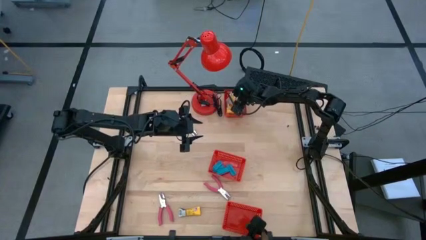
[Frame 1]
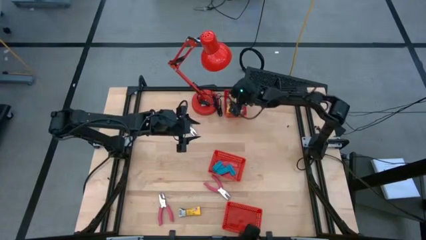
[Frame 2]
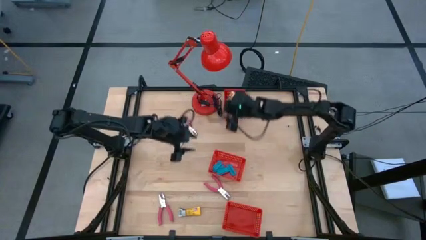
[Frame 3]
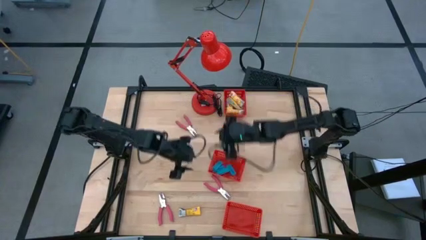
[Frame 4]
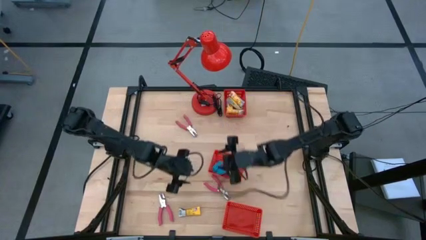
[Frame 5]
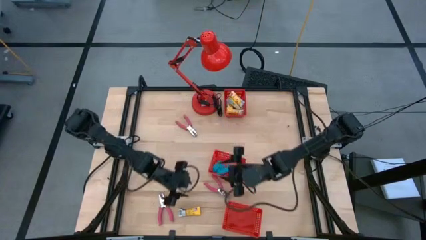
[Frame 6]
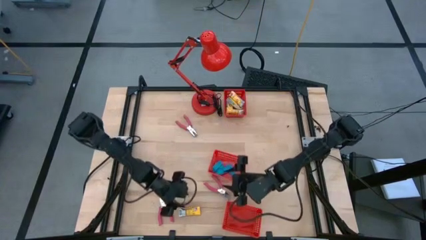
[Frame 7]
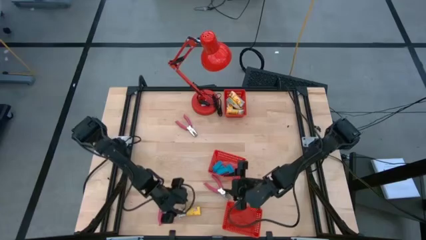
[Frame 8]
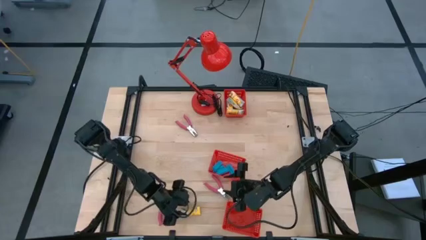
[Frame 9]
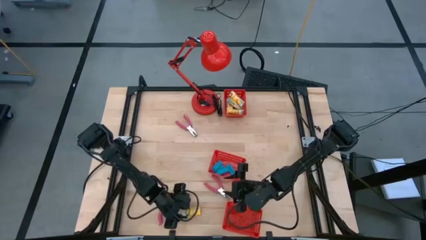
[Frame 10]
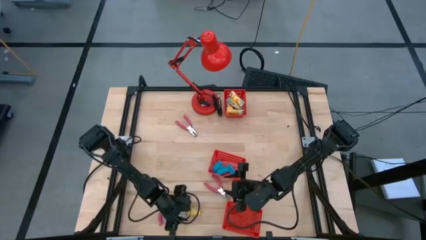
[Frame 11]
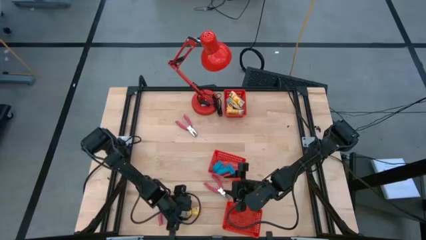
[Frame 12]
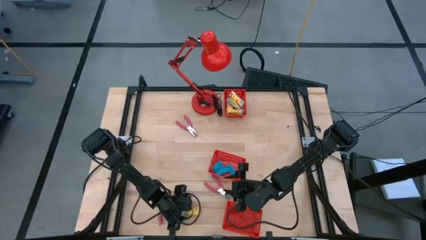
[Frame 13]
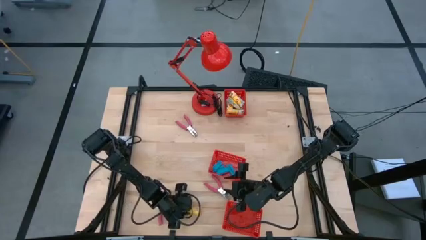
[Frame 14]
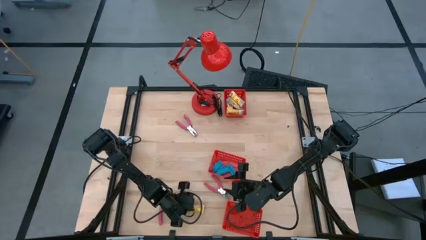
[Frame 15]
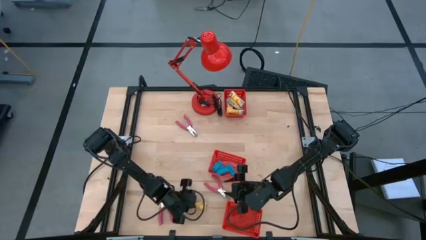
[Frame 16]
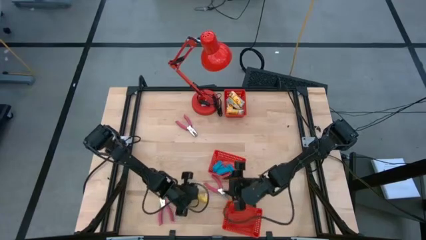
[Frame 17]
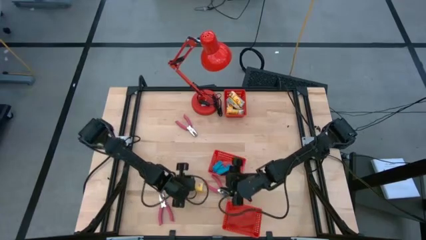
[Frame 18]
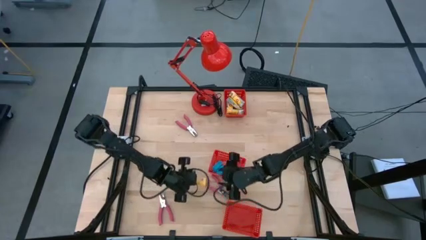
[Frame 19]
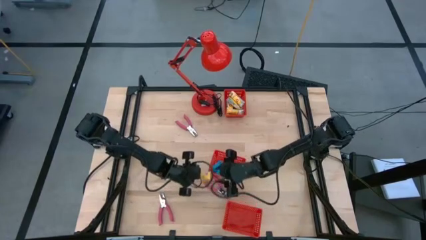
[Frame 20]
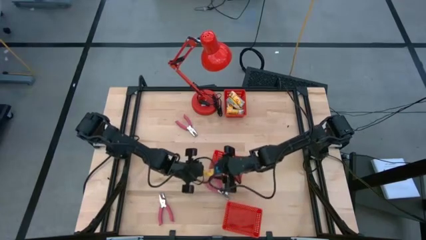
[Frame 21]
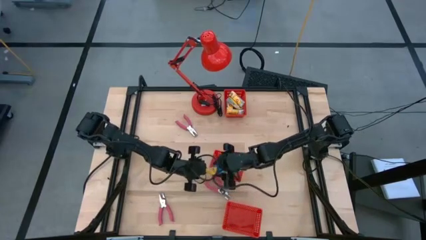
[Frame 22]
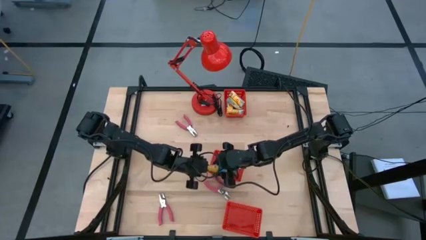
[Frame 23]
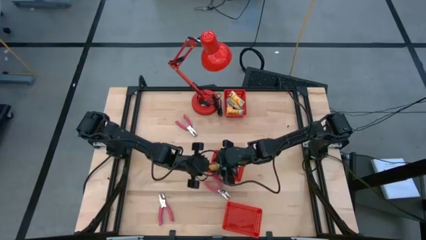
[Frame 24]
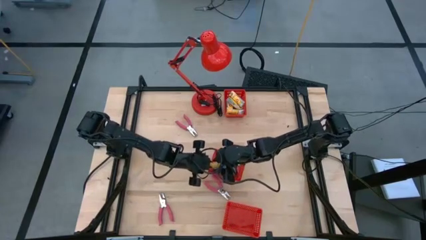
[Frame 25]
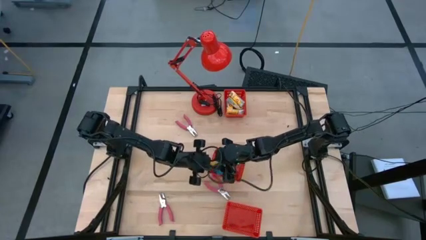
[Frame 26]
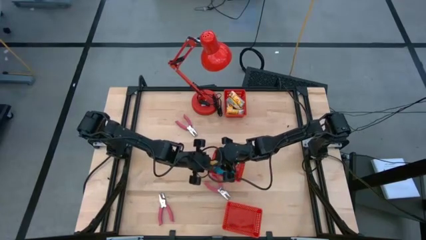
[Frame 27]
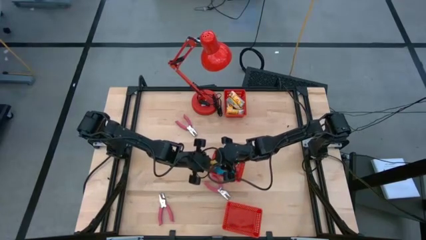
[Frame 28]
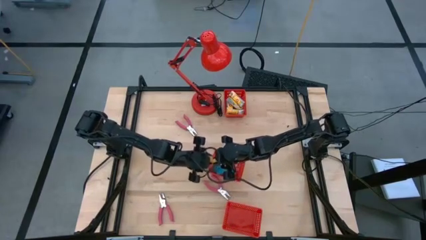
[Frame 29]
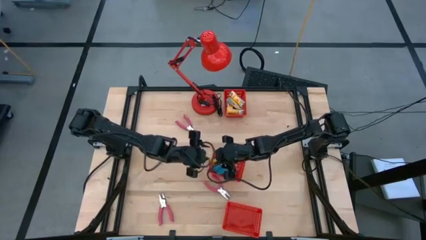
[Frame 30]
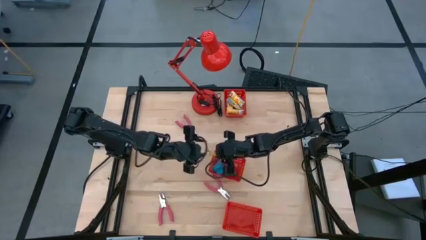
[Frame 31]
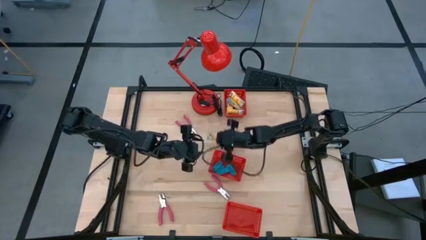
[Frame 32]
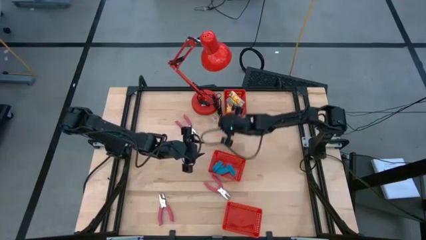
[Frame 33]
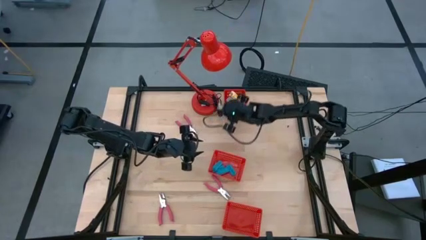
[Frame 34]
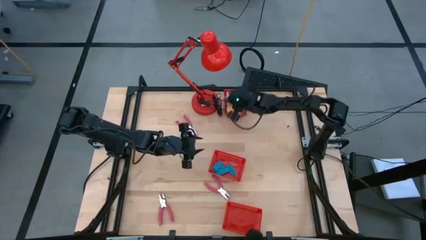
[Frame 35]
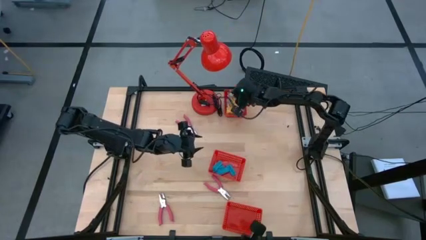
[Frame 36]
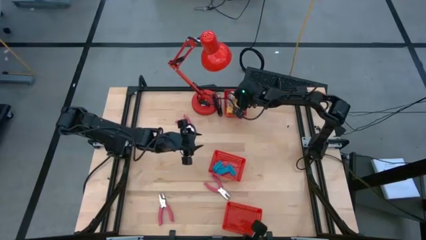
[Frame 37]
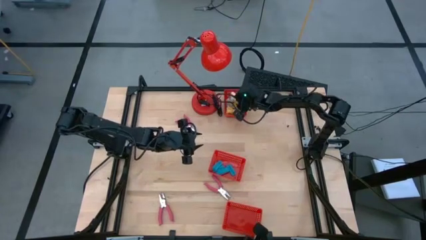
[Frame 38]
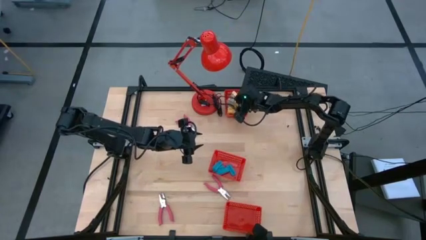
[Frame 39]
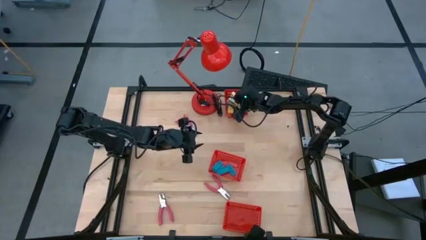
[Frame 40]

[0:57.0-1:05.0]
Task: Pick & Place School Supplies
Put the yellow crayon pack into the top red basket

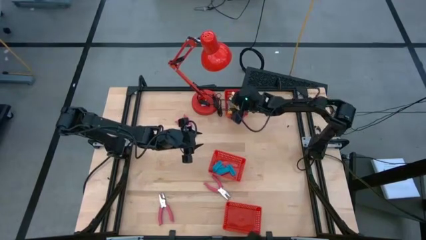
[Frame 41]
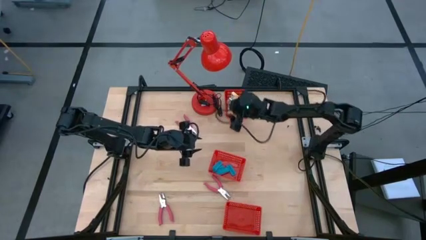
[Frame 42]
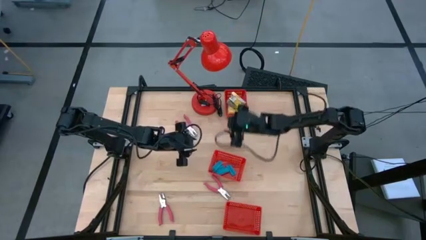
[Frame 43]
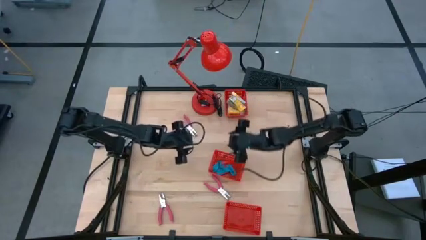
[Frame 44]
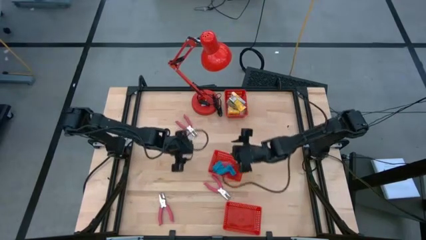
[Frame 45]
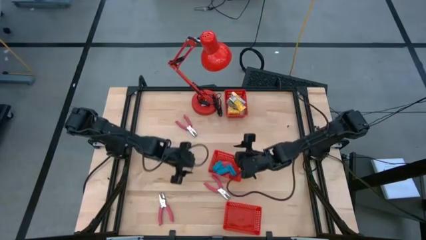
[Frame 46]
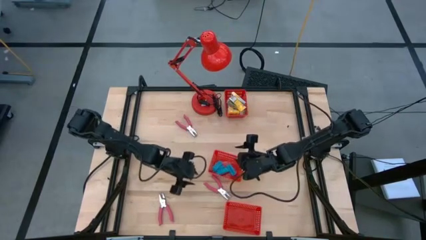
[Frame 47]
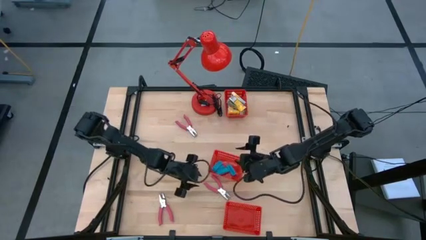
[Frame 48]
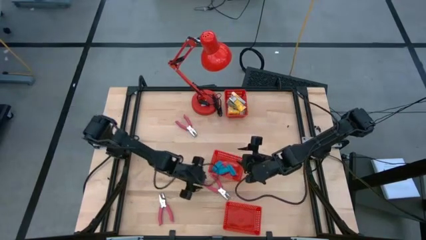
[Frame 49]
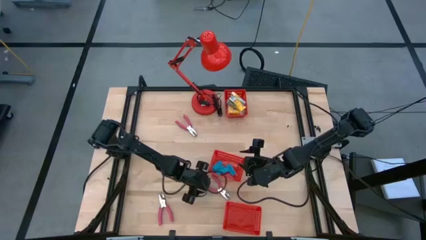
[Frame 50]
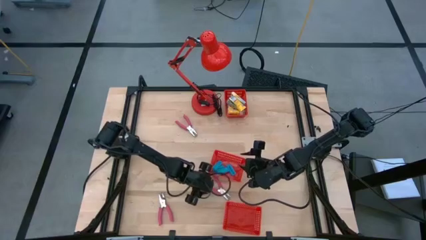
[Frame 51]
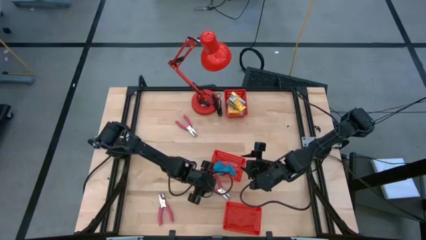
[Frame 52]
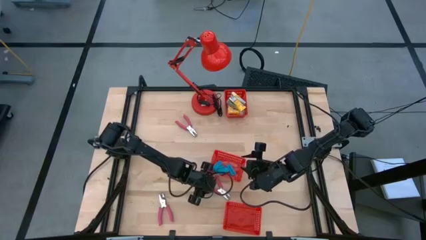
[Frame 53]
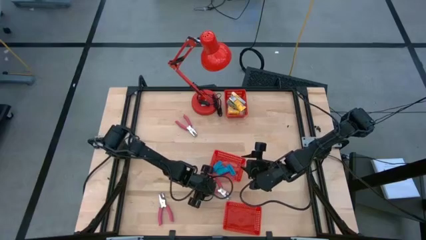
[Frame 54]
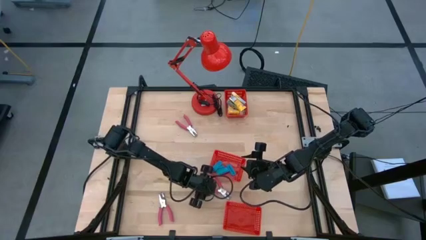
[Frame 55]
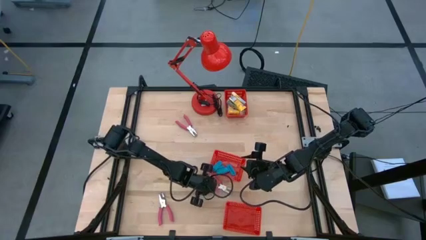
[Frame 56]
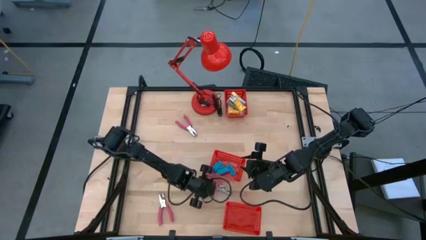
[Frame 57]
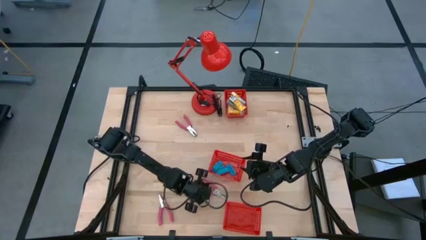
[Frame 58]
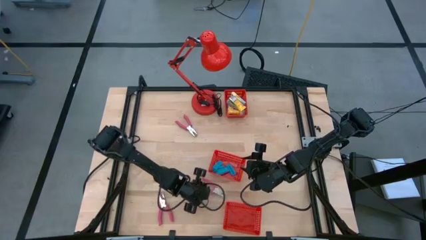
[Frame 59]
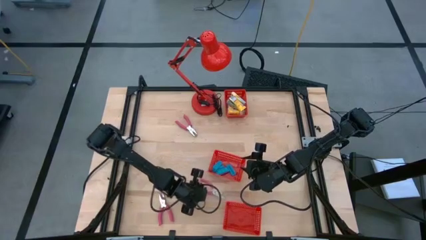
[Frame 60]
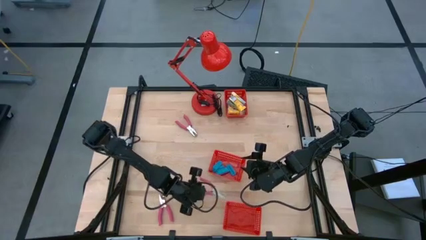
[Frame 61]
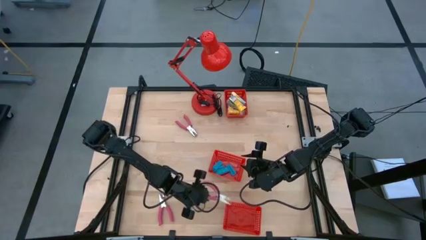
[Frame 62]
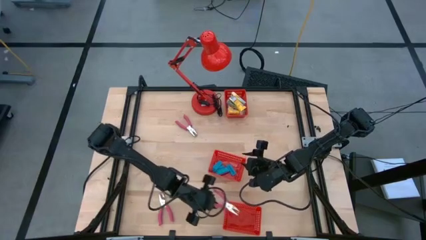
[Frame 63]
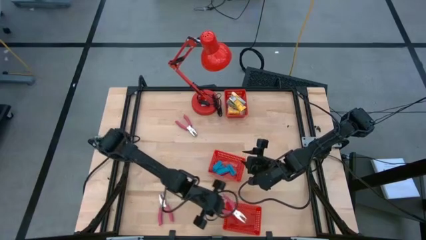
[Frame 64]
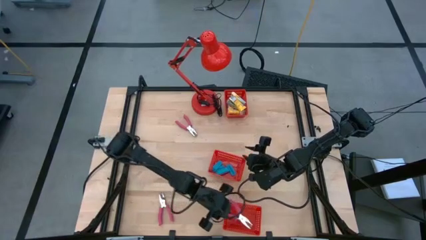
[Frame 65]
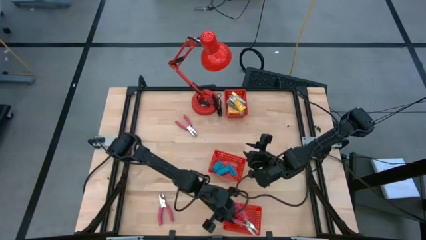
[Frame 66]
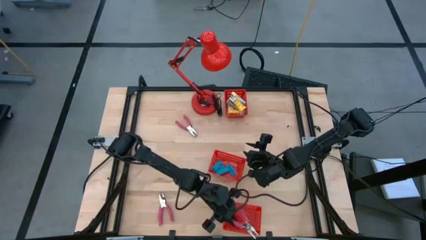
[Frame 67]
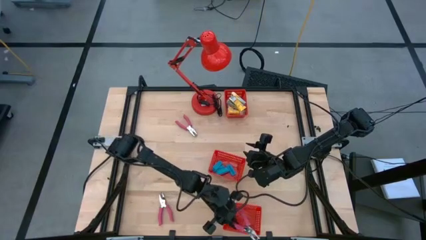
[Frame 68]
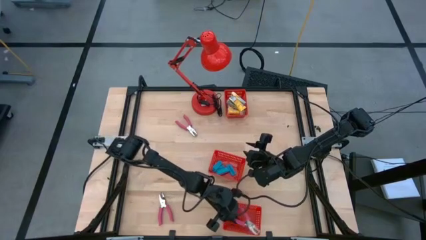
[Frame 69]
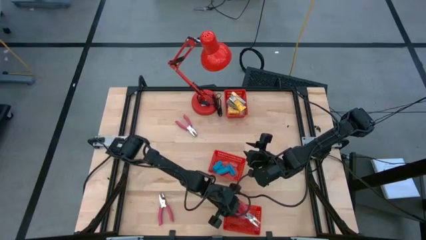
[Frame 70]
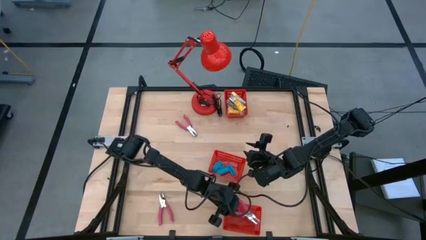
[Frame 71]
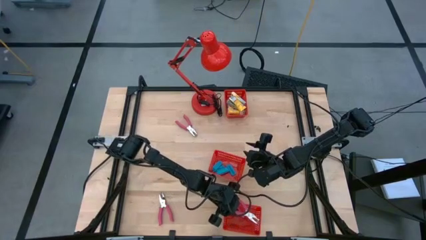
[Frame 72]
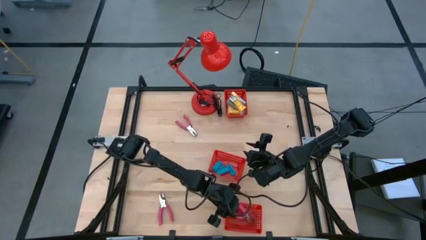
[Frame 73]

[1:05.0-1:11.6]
Put the pink hole puncher into the bottom red basket

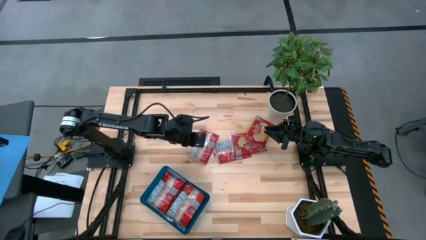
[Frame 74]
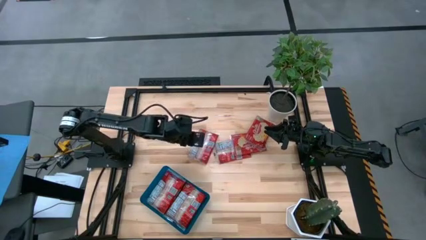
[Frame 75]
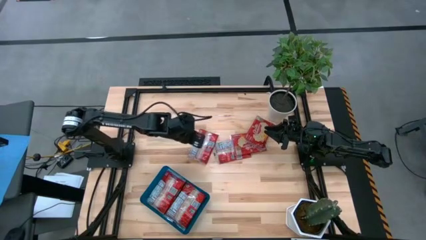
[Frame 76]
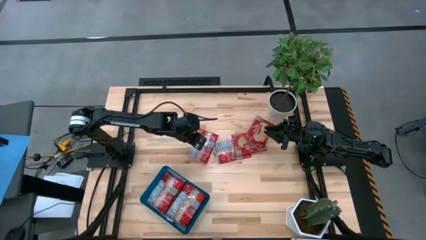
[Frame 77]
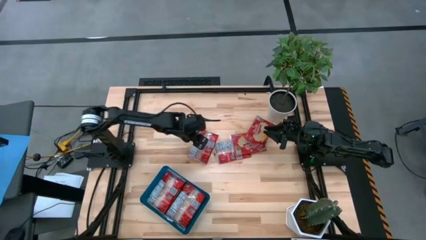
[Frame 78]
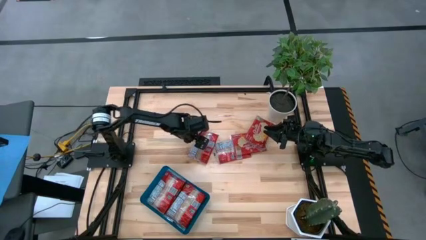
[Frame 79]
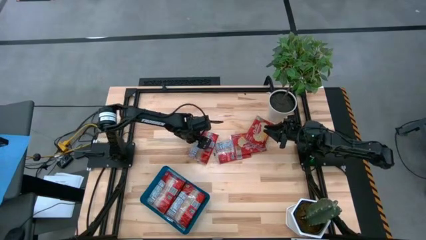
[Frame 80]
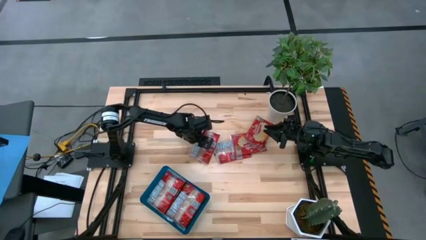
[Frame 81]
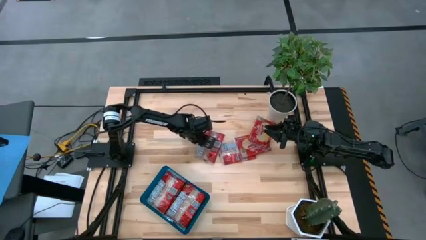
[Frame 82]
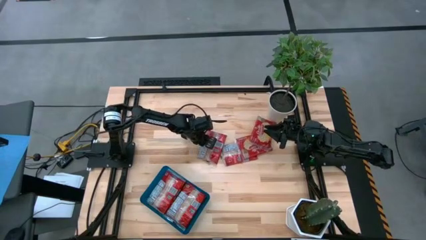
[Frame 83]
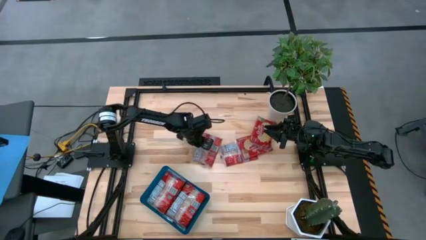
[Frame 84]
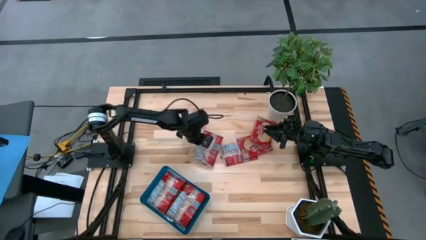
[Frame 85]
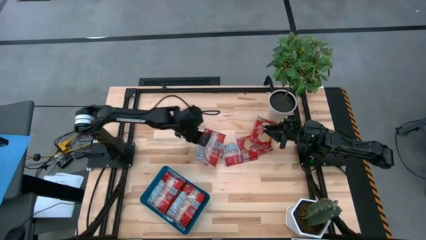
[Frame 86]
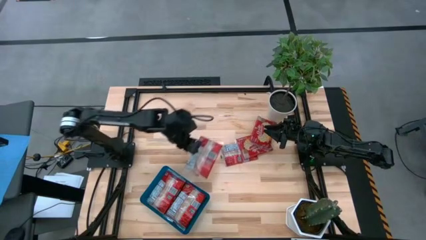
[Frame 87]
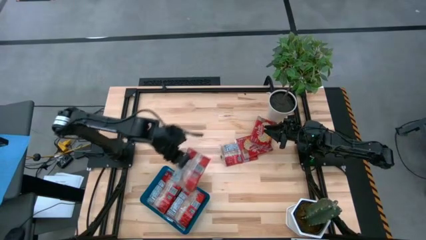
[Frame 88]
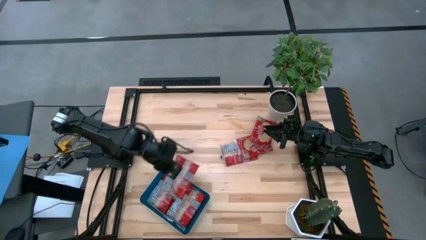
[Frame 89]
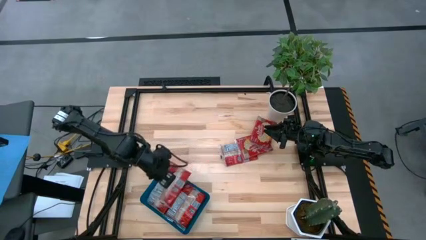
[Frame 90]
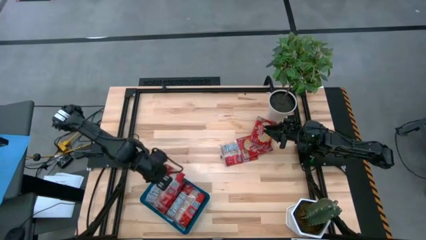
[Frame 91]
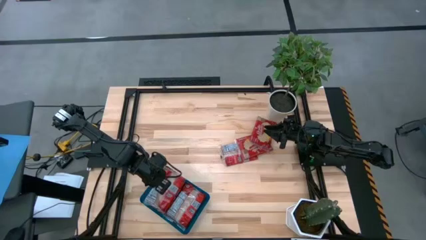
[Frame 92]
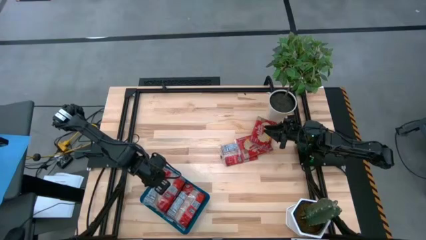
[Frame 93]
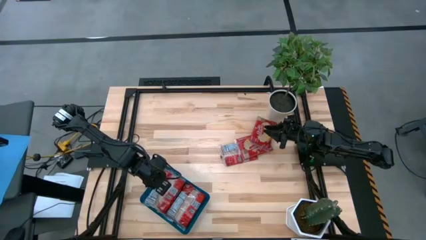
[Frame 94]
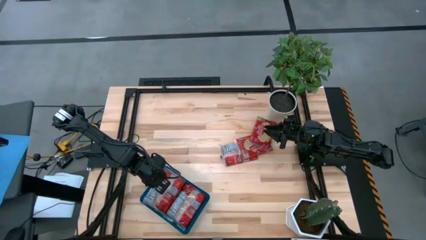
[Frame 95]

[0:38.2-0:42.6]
Task: Sort popcorn bags into baskets
Put the red popcorn bag into the blue bin
